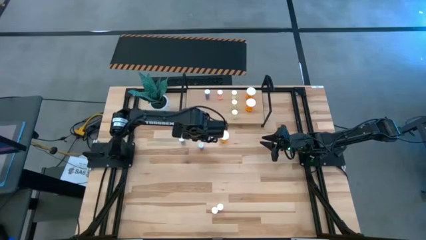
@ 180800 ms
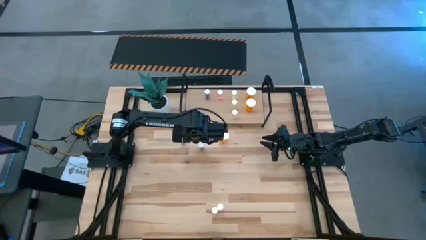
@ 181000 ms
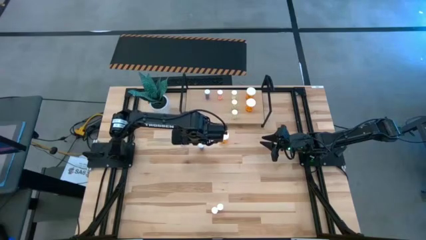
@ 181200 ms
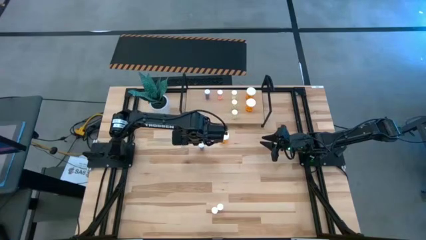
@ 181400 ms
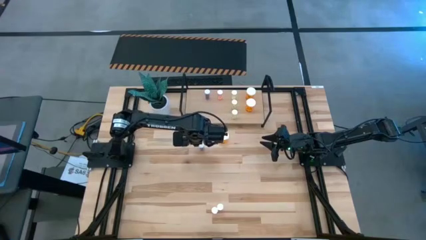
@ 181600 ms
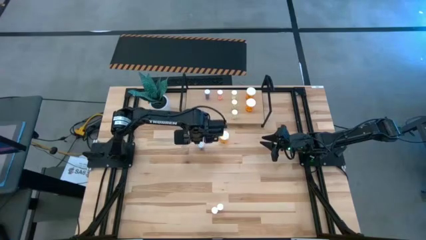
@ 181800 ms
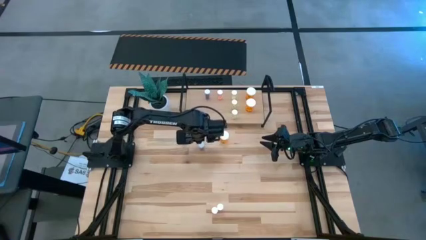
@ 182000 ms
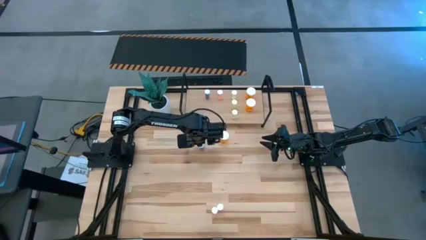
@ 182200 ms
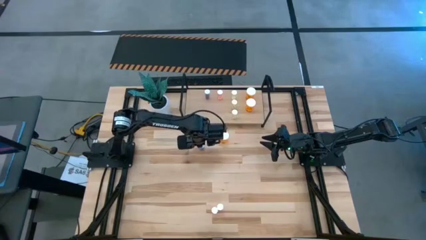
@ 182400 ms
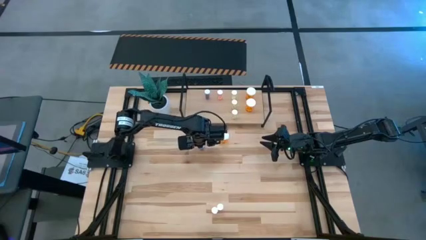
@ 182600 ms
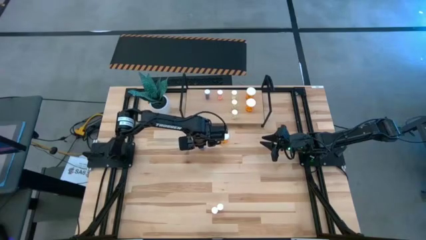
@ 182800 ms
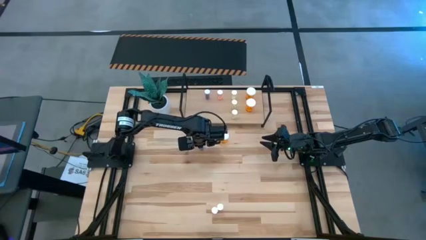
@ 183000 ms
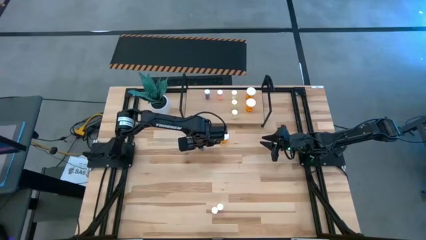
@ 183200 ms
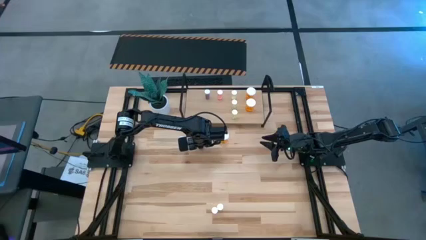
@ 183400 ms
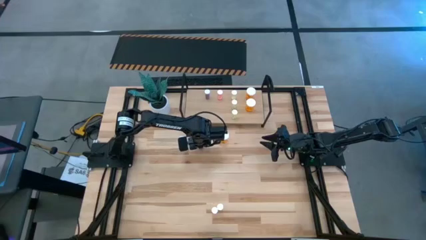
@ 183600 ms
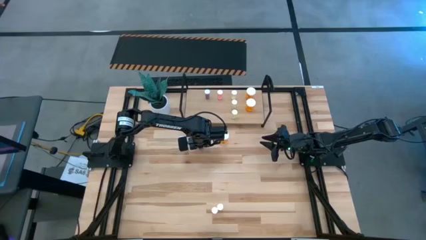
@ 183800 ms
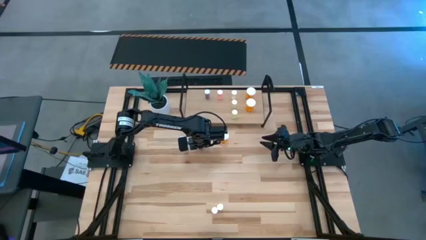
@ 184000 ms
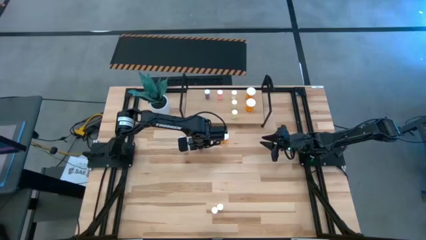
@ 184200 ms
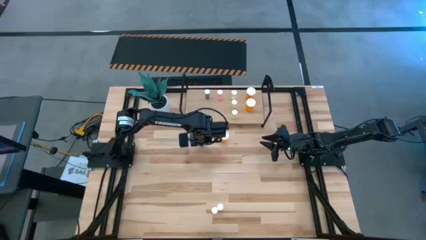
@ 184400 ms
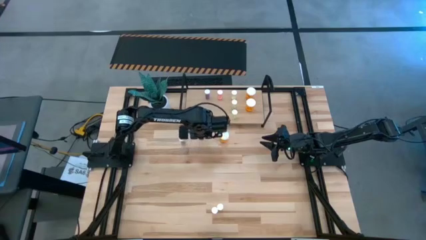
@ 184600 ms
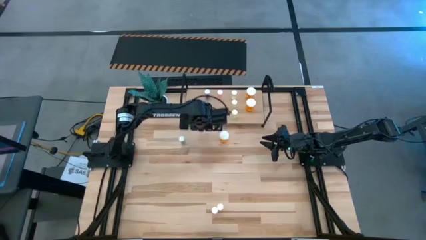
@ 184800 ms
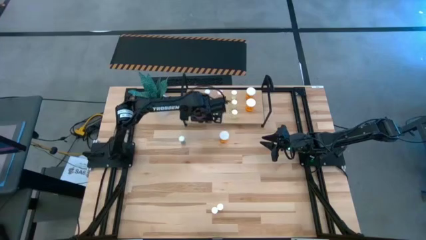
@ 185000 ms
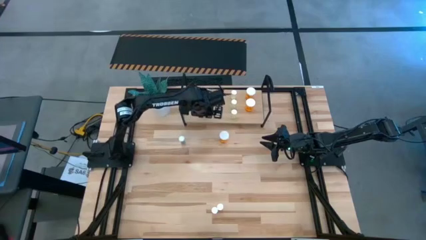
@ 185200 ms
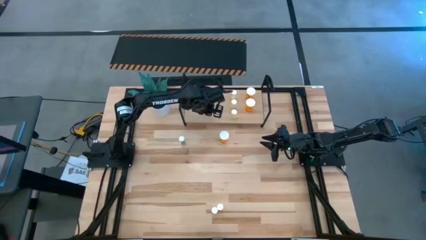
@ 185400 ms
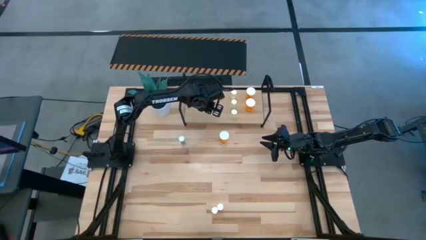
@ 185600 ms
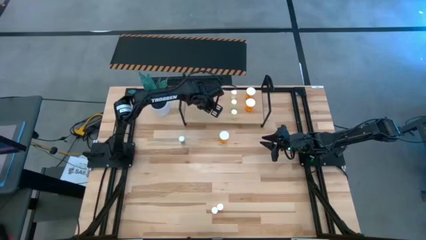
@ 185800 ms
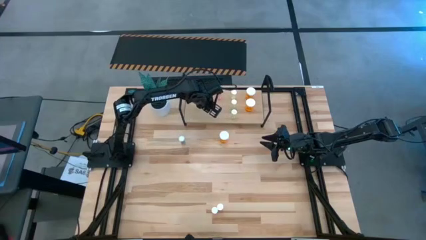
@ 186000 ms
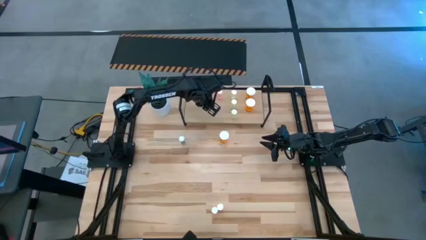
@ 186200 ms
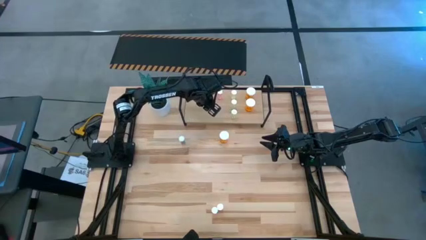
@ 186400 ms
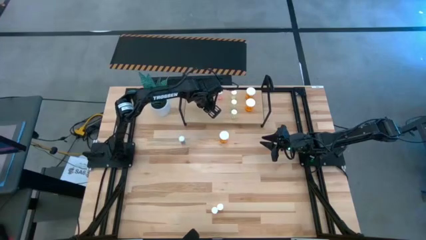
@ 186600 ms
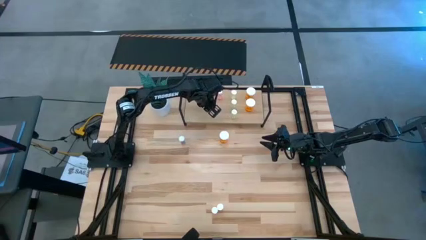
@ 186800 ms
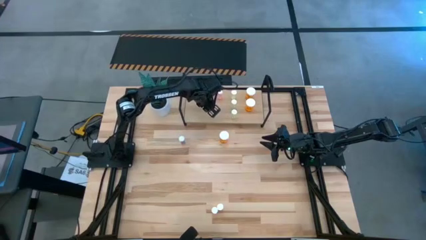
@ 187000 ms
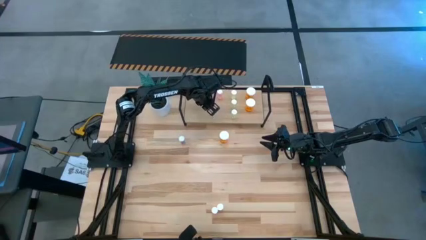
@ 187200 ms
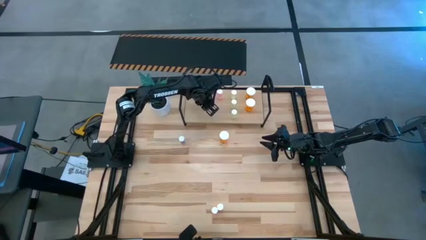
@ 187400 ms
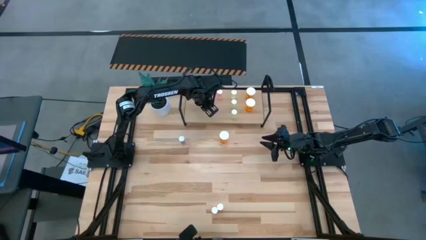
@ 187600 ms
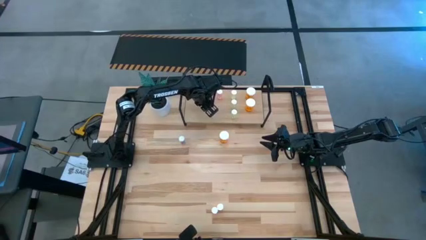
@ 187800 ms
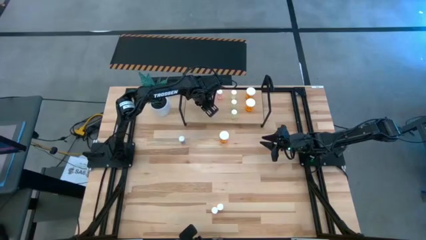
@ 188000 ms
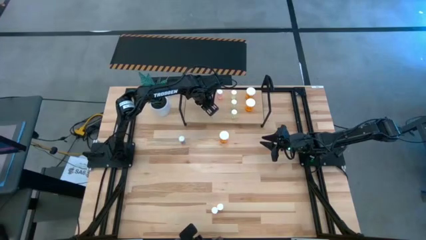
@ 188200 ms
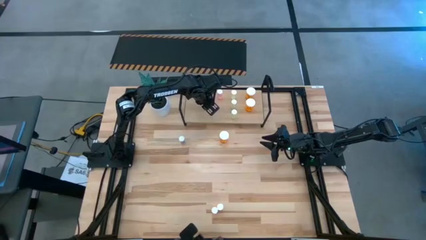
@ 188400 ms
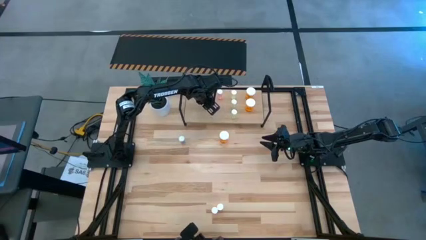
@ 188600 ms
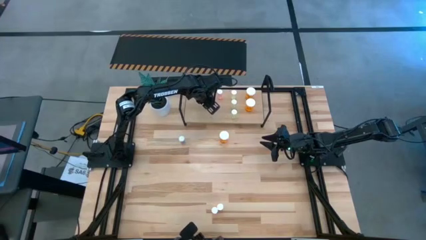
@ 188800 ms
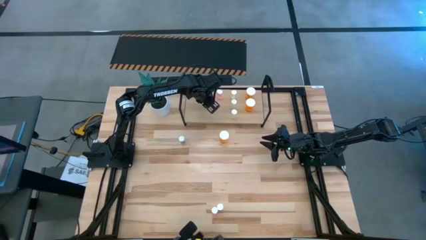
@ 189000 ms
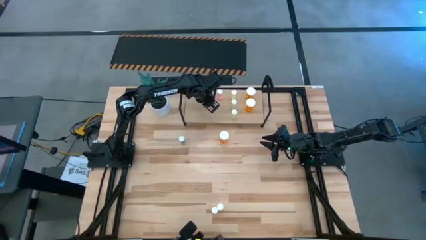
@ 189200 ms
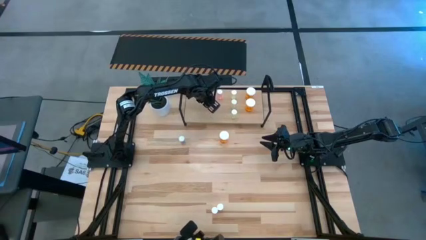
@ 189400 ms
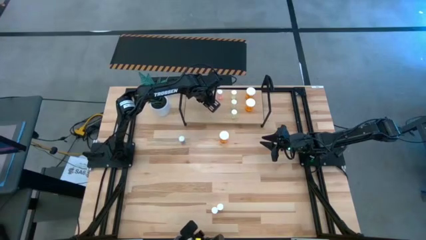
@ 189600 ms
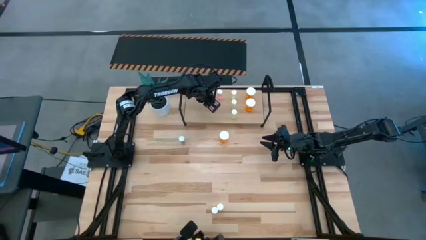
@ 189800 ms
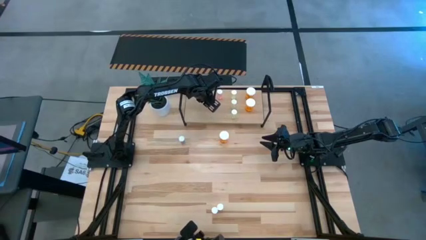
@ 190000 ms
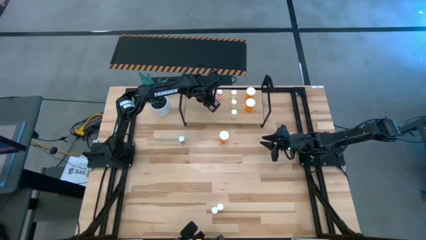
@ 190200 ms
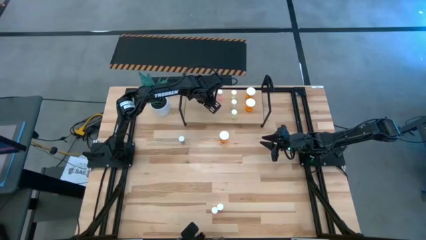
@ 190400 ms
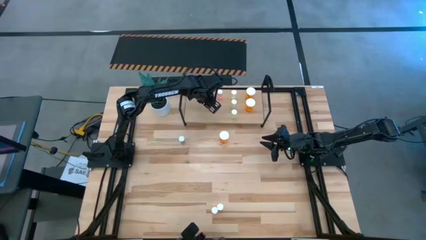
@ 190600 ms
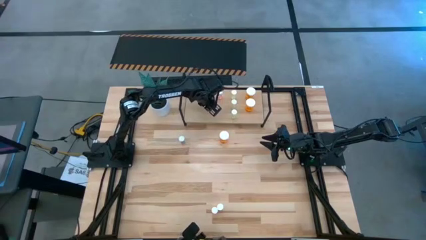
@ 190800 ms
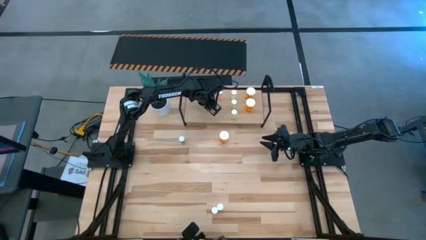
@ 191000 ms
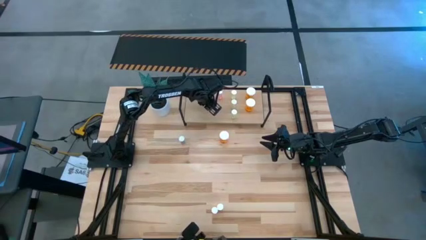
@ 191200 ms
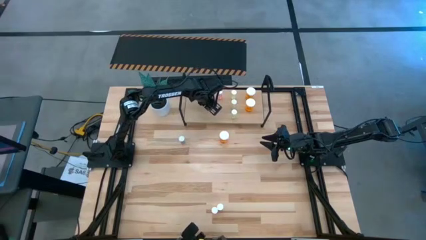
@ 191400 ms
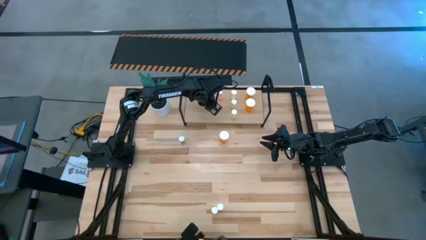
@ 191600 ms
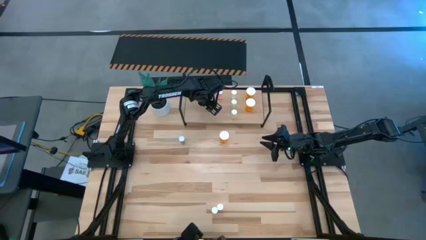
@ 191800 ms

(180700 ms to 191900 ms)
Task: Pick and place medicine bottles onto shelf by color
Put the blue pill bottle on the shelf

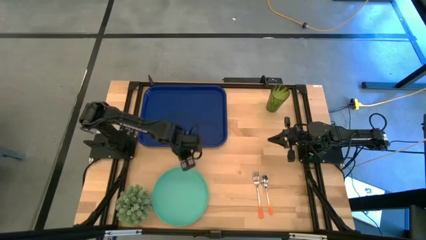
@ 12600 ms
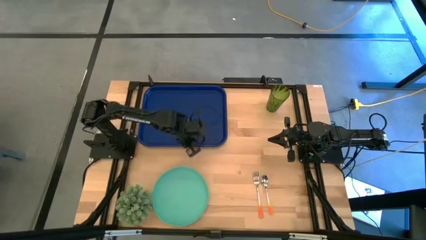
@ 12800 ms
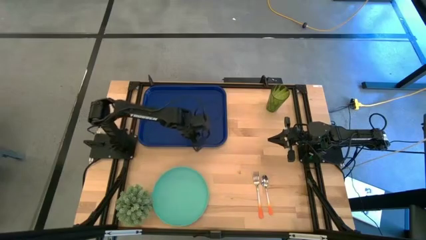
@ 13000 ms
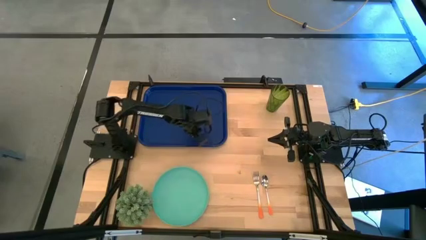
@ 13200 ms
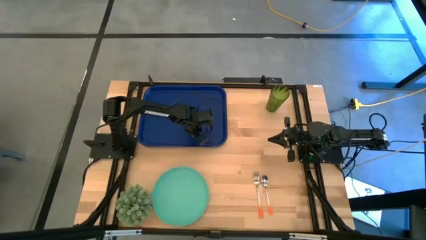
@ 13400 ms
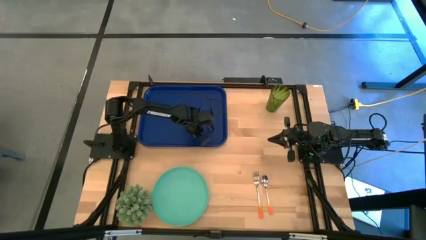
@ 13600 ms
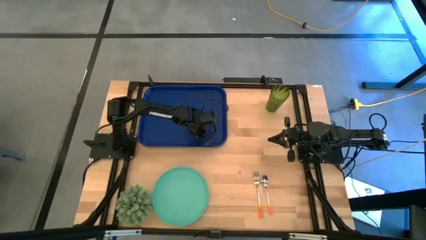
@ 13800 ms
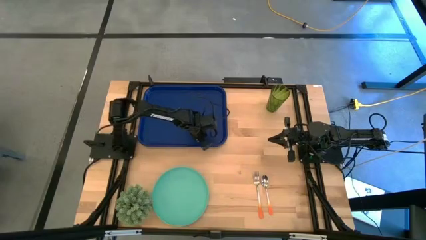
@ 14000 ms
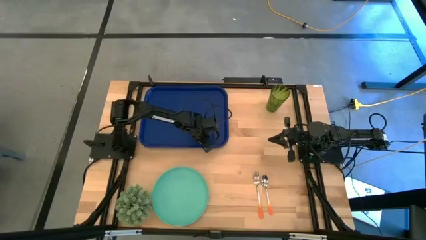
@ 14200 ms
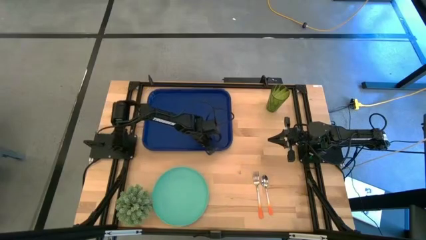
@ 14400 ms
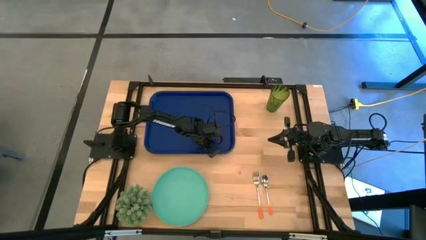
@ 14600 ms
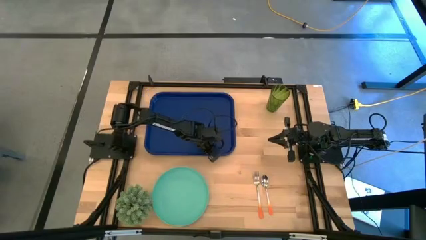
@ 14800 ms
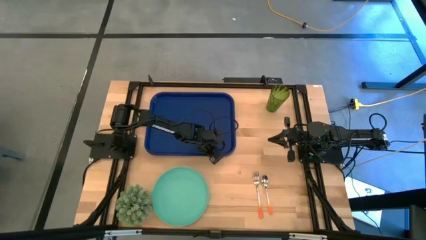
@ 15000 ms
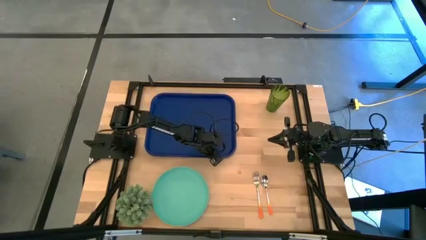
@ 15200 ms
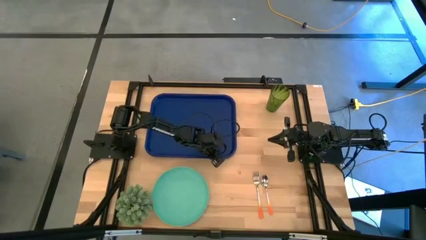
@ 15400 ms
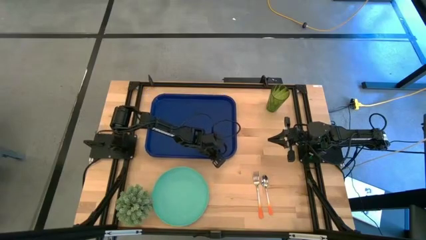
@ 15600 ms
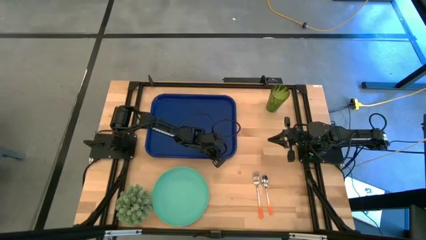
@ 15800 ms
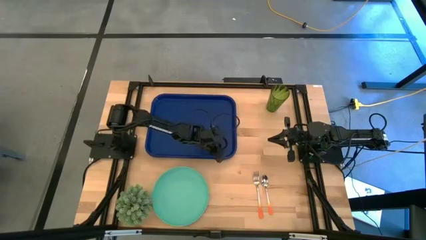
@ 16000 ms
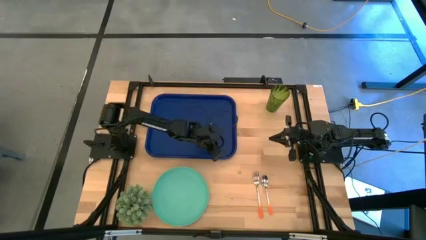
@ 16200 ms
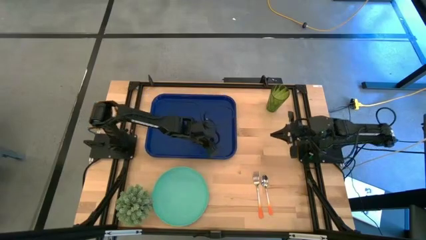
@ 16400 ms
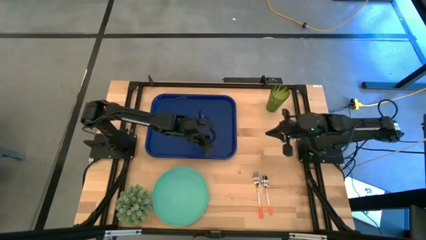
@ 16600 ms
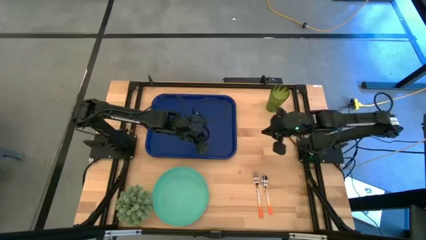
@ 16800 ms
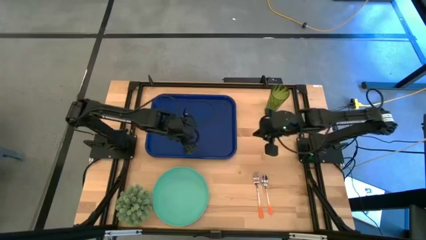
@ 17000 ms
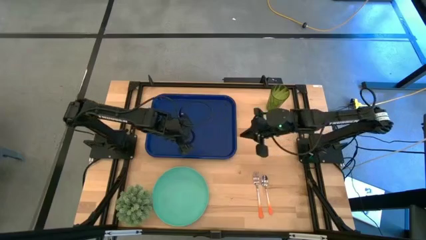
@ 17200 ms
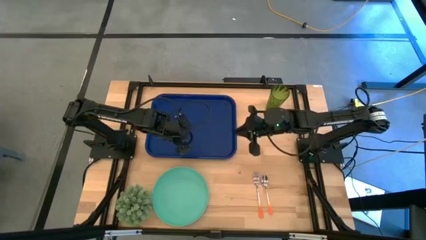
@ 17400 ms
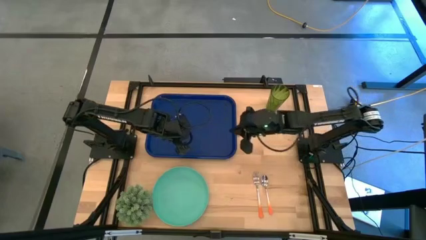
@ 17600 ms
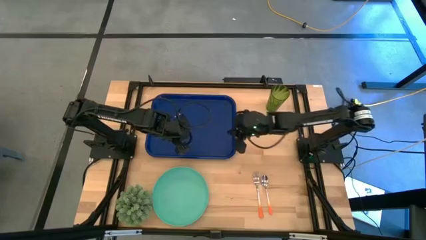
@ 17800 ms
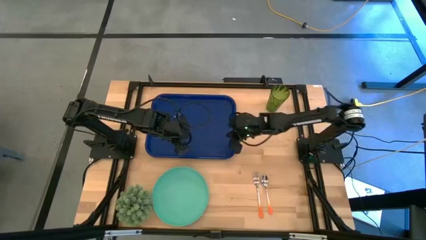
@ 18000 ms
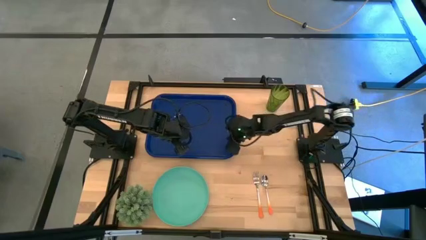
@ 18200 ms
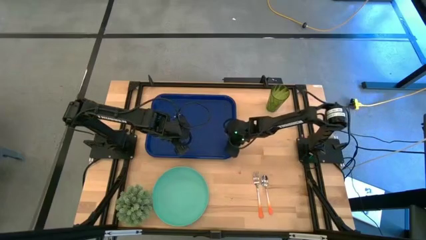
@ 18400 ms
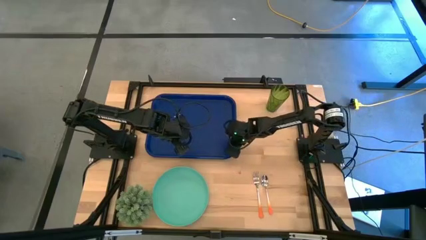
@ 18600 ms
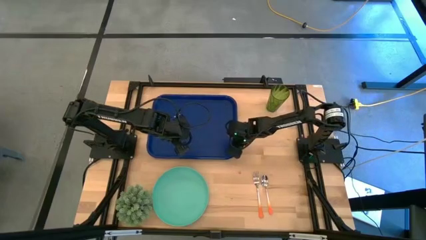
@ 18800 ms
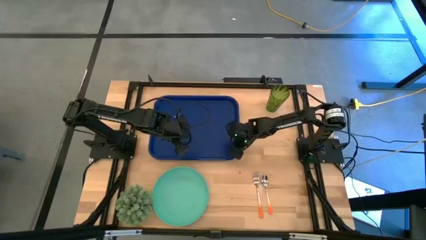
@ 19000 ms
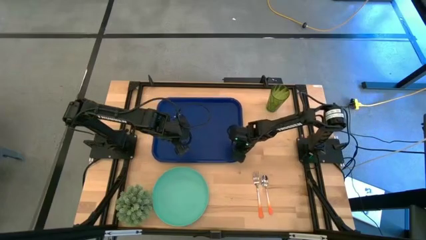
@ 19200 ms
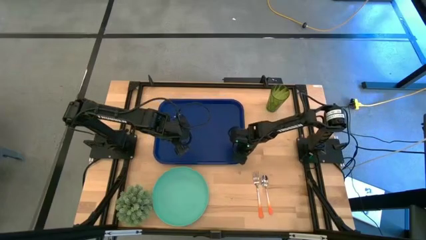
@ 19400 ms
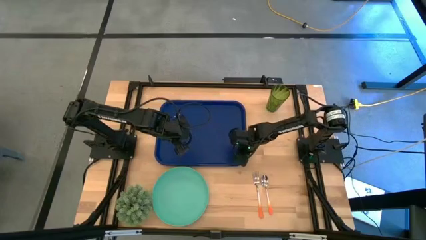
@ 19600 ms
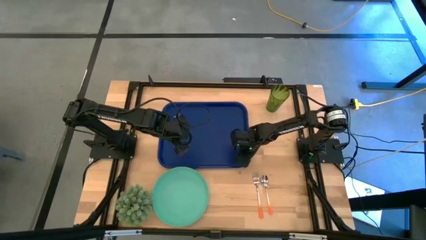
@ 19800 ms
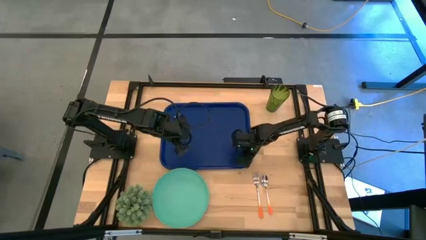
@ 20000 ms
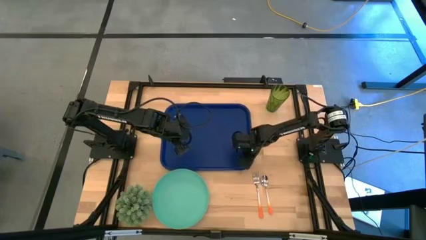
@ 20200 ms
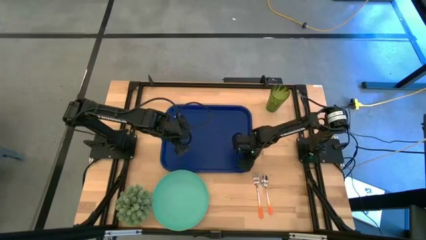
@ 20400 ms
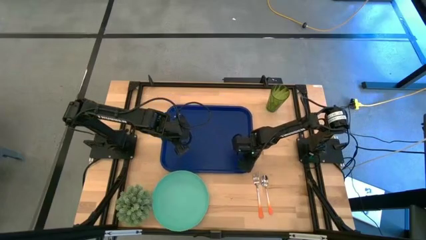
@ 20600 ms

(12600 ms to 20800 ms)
Task: Pick and place plate/cup/fork/spoon on tray
Adjust the blue serving tray
